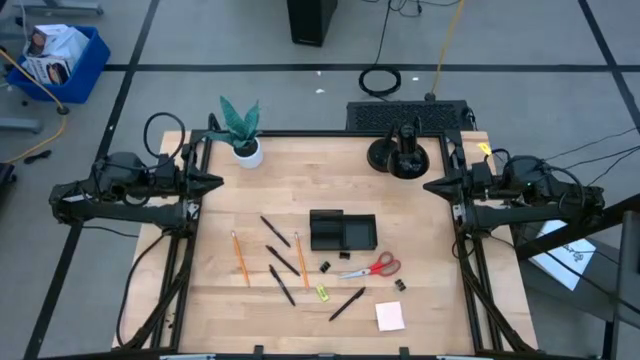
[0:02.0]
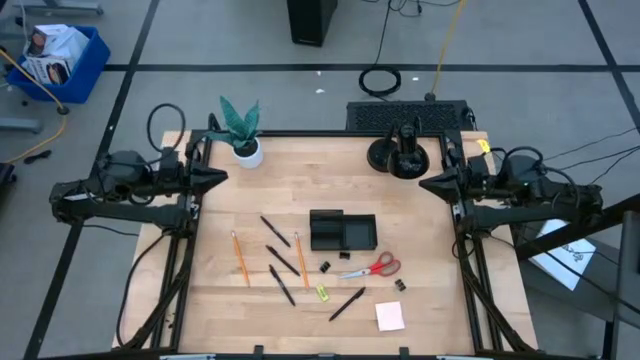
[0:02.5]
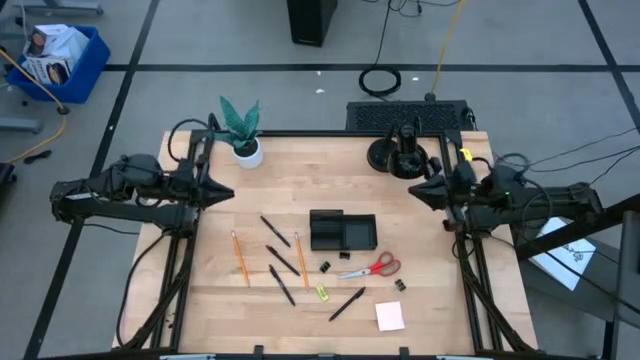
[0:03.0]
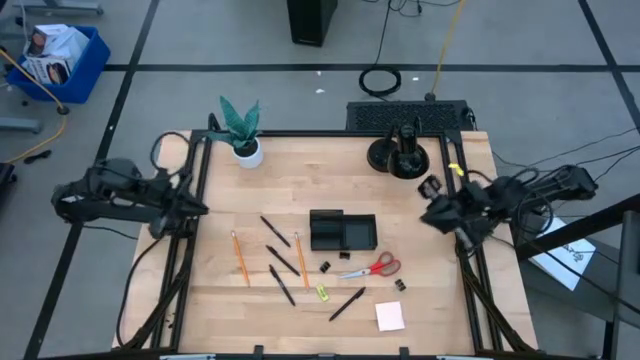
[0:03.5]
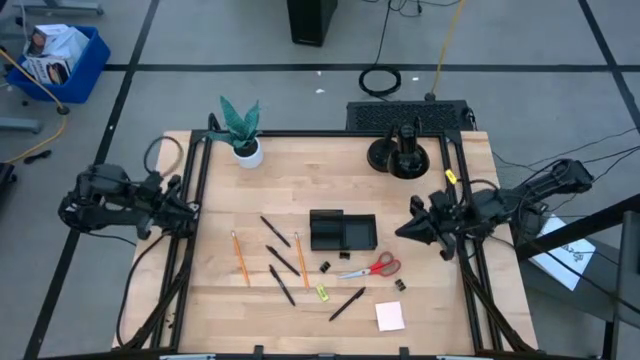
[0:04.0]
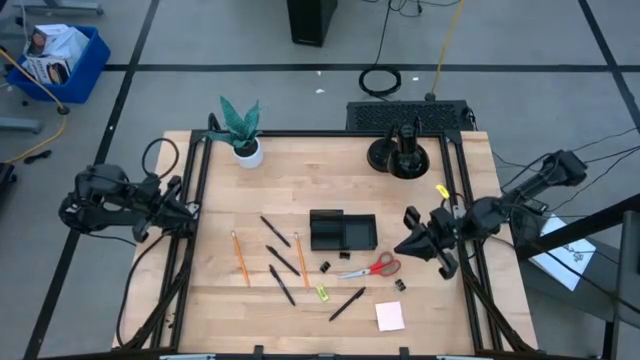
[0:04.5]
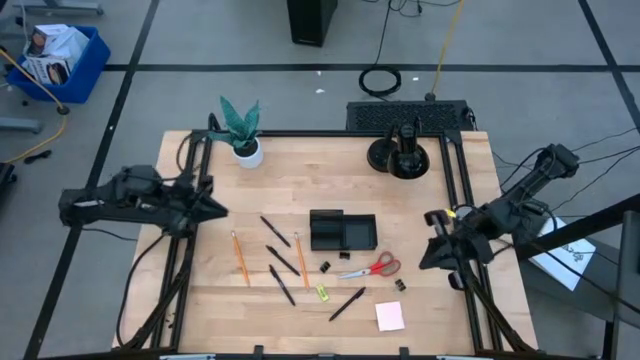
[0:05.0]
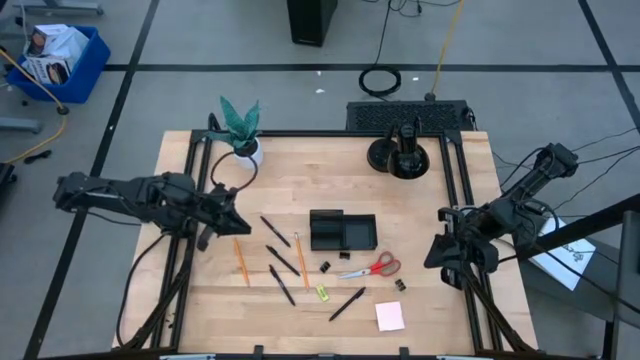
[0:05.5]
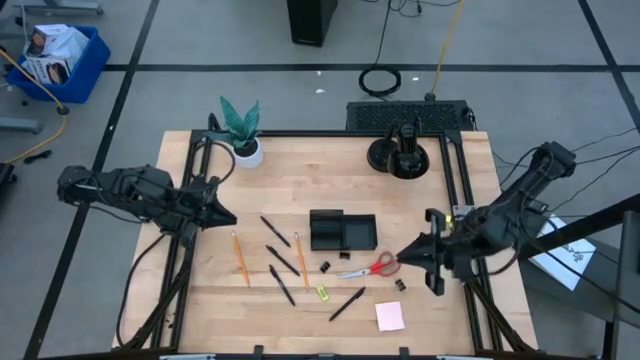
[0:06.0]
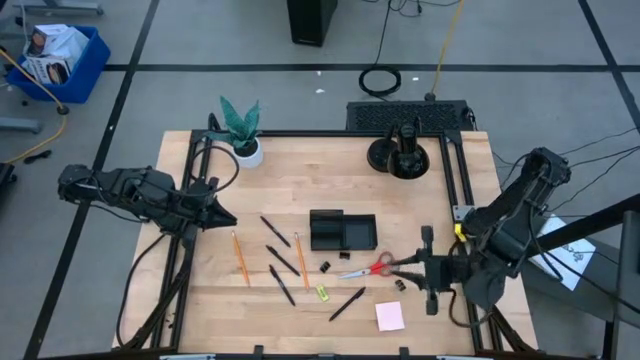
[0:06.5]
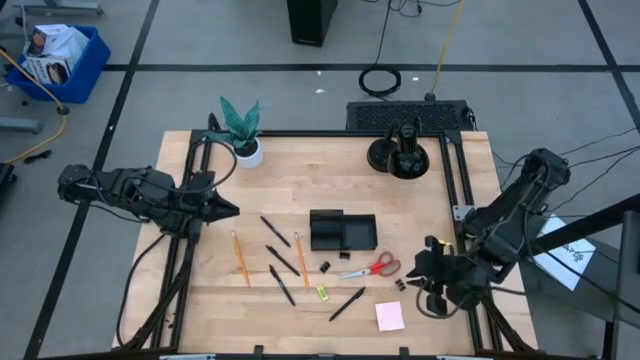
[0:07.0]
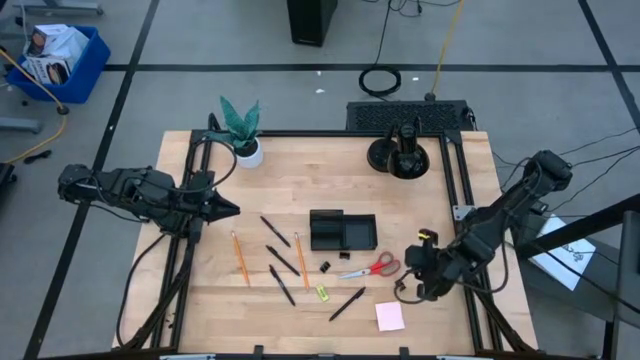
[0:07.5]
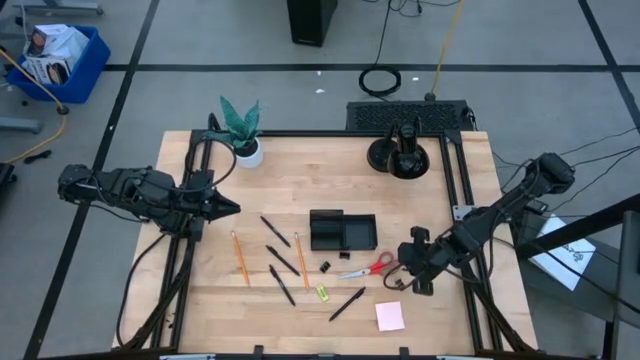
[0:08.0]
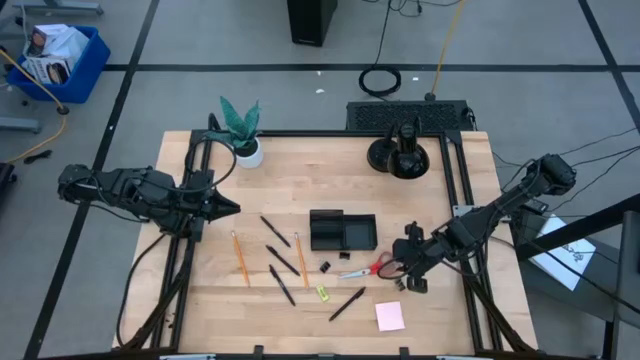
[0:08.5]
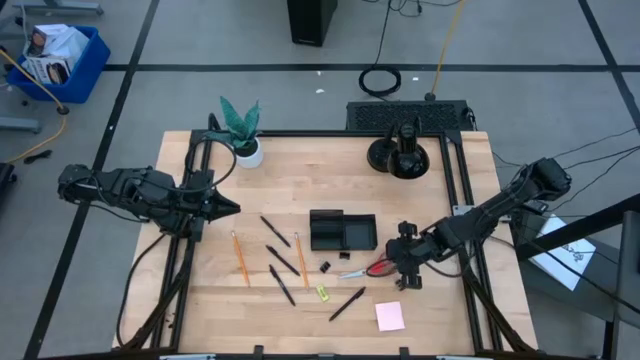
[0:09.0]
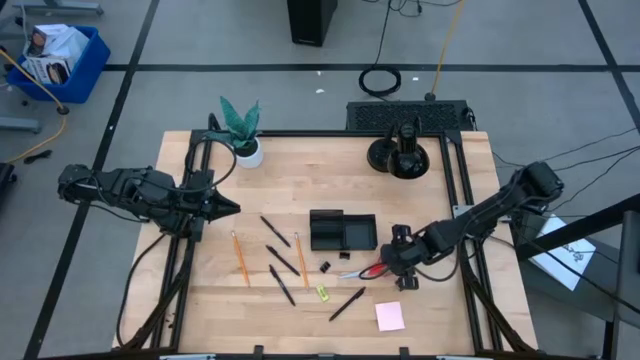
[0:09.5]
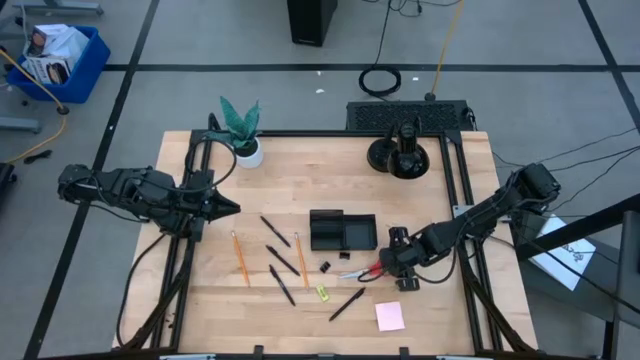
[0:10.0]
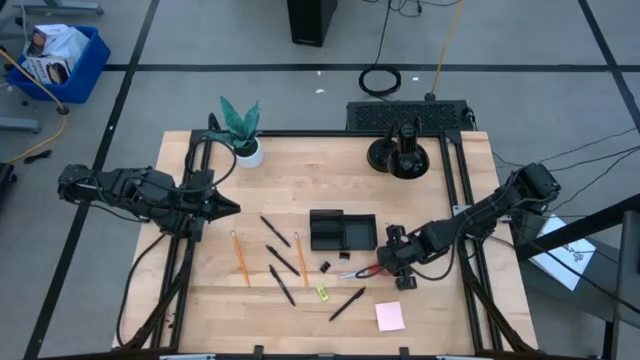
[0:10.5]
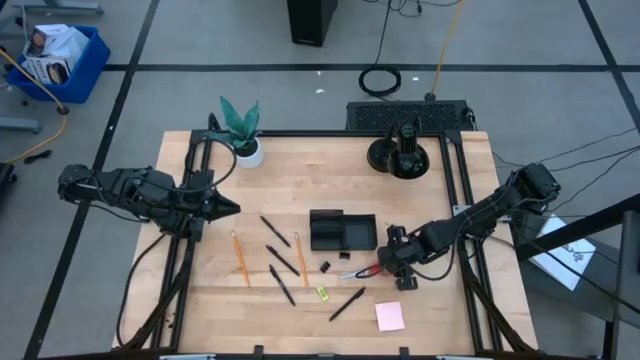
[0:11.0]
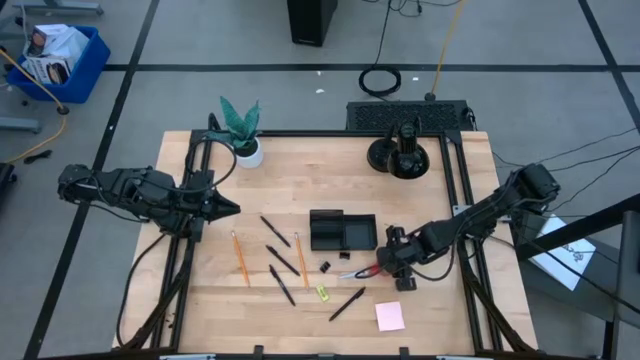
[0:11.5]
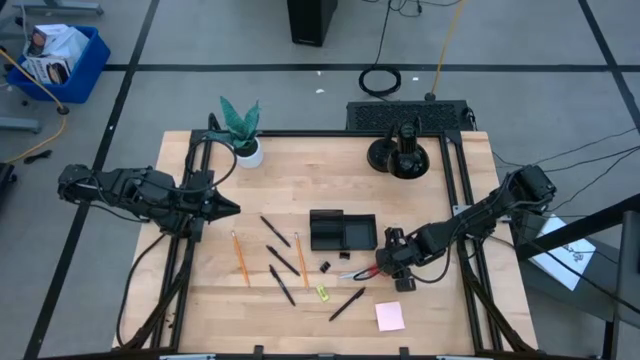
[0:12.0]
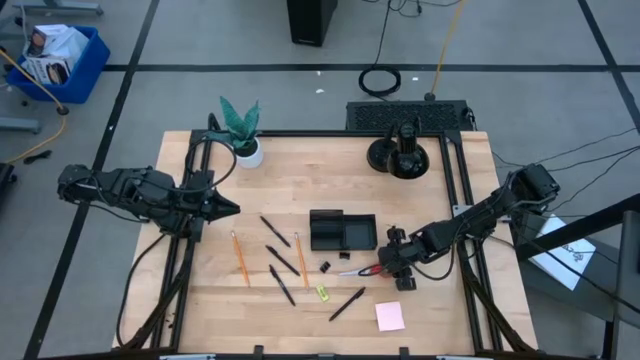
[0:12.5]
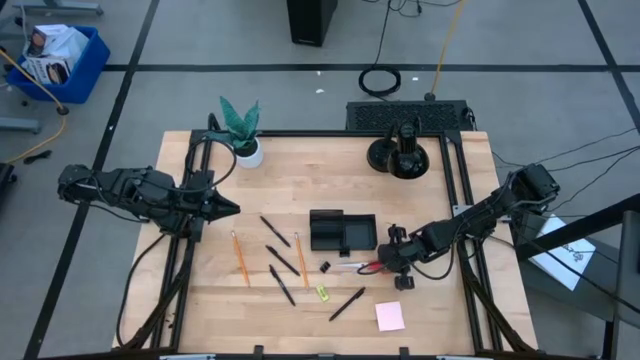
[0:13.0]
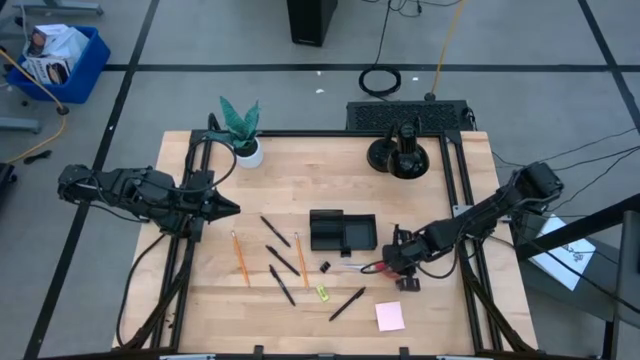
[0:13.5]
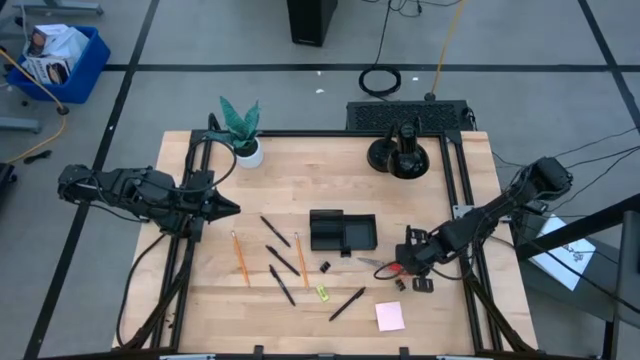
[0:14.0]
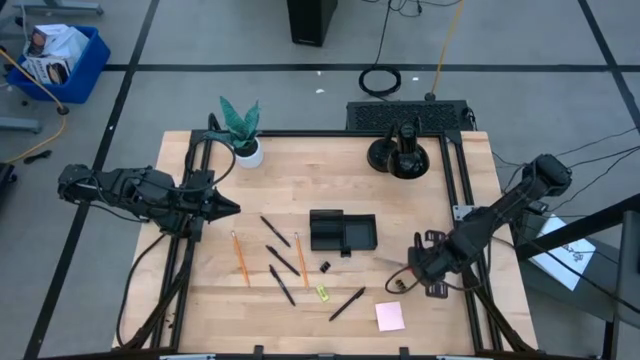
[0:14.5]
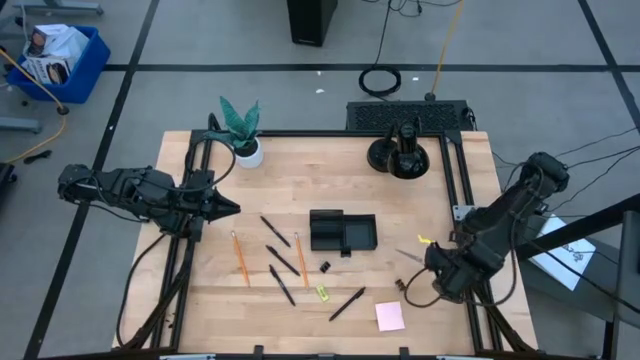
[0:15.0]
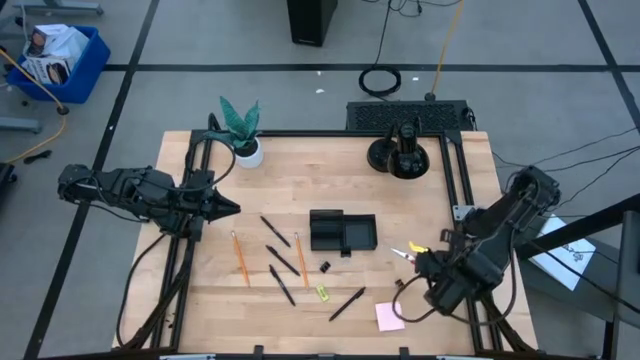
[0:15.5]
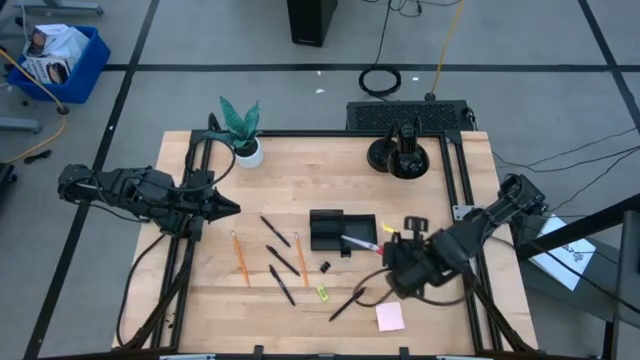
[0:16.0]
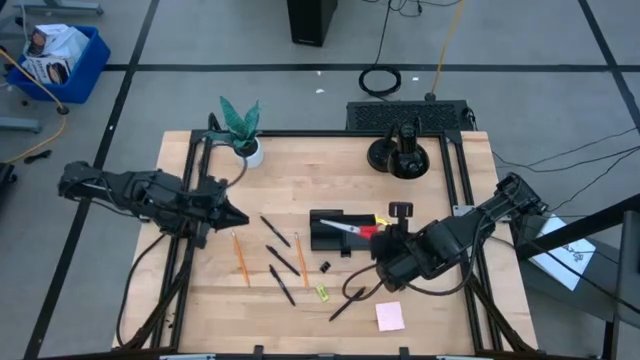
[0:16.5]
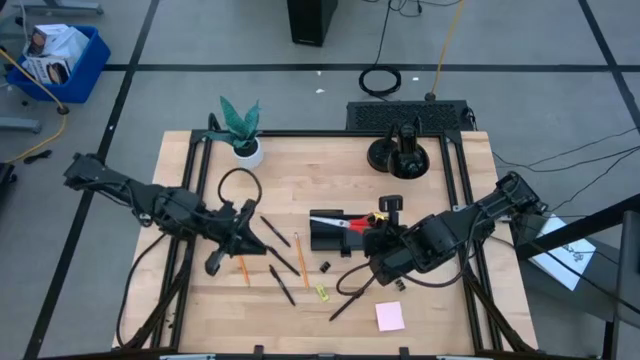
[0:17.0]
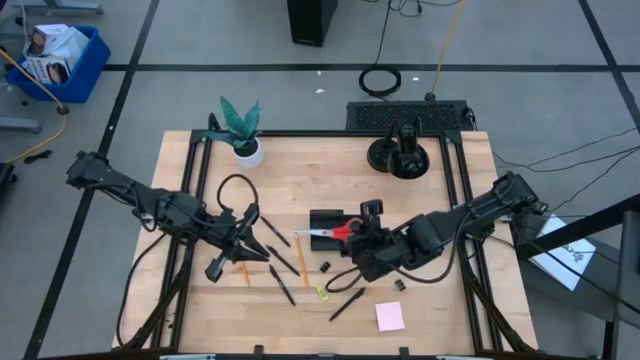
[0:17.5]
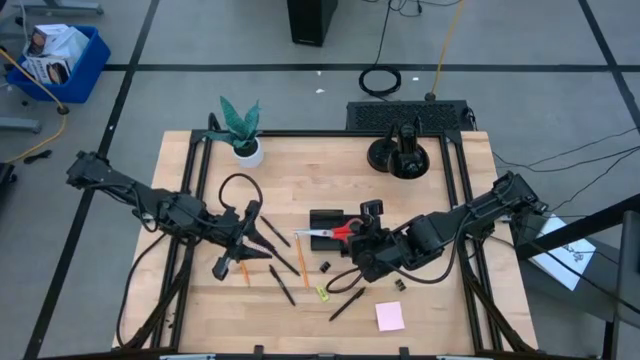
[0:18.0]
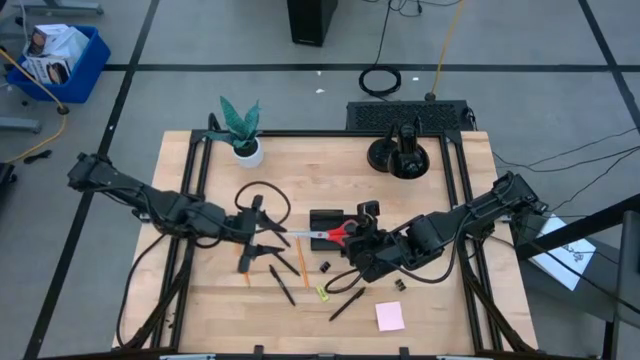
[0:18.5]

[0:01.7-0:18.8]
Task: Pick and place office supplies into organizer
Put the orange scissors into the black desk organizer

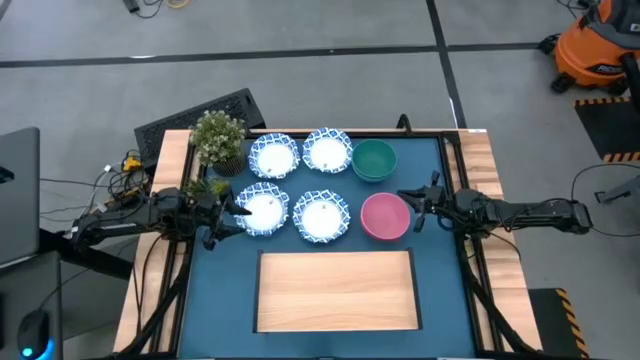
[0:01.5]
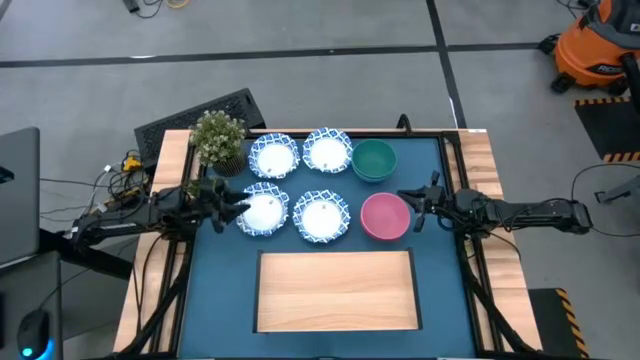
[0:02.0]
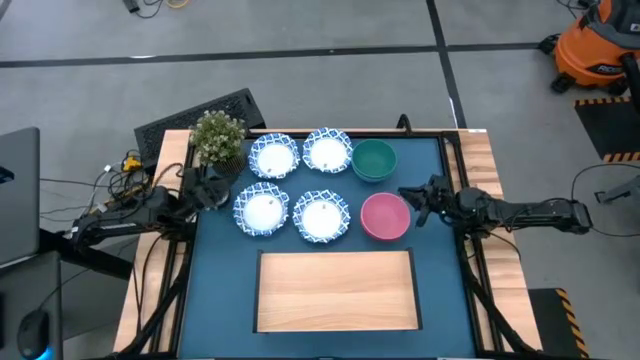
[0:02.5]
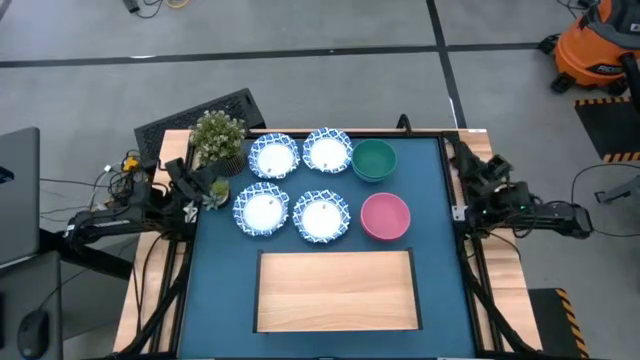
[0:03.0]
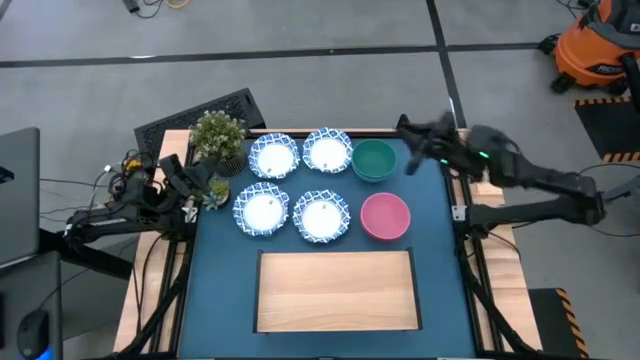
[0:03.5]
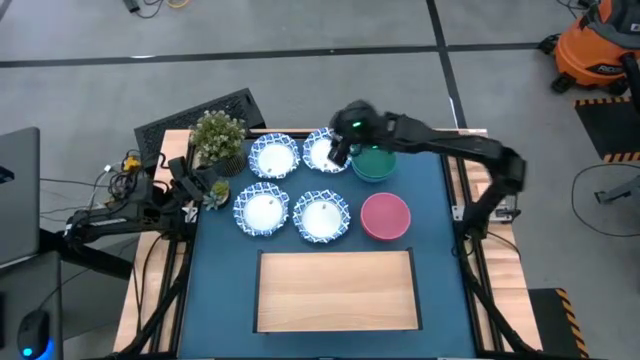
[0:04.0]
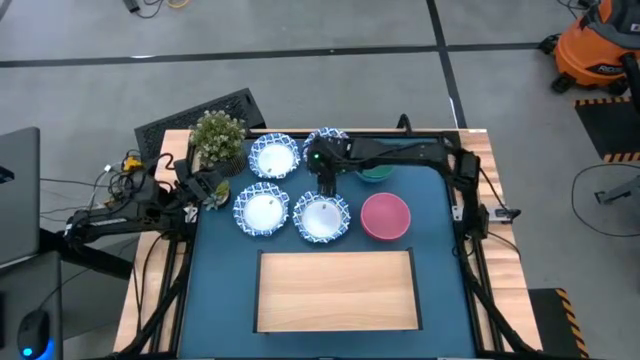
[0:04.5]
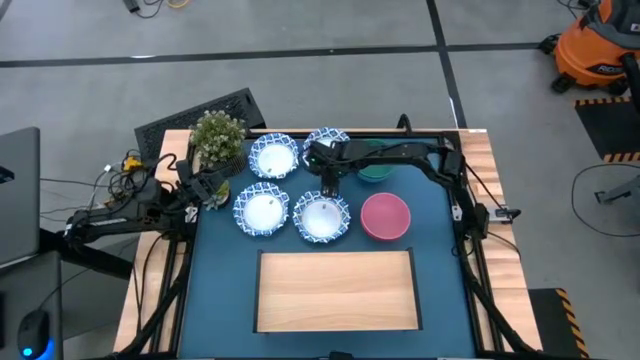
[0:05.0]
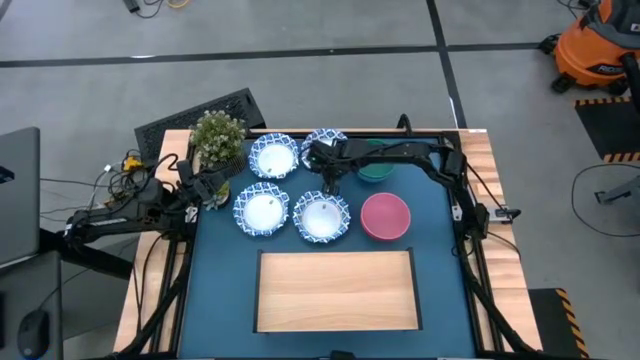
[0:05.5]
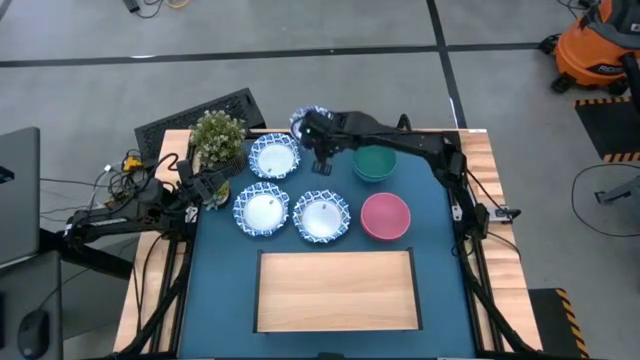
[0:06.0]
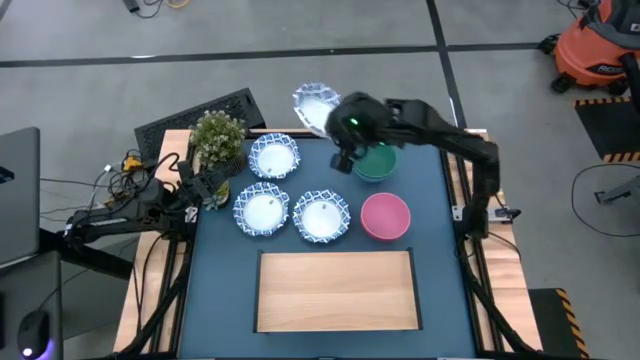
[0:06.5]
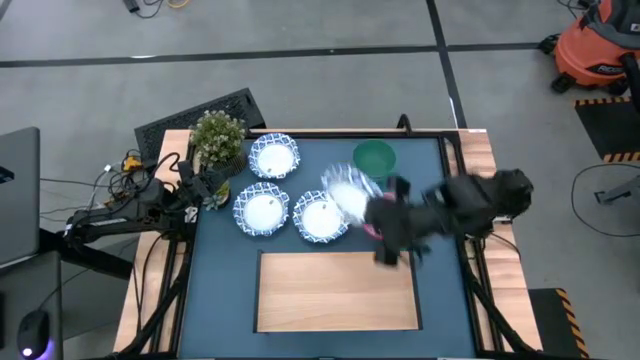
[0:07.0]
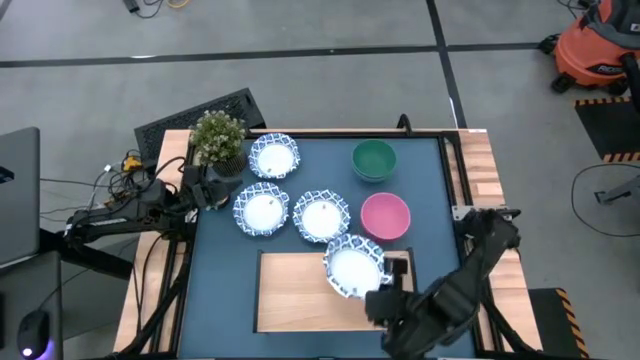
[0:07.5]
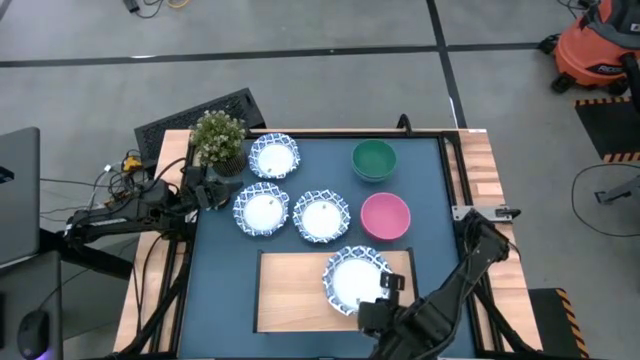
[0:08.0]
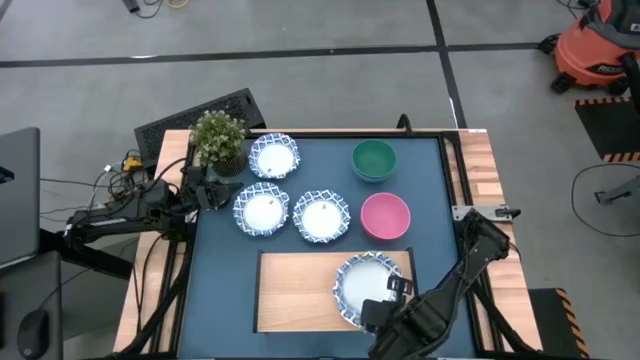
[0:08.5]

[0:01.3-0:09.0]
Task: Place and stack bowls onto a shelf
Put the blue patterned bowl on the shelf
